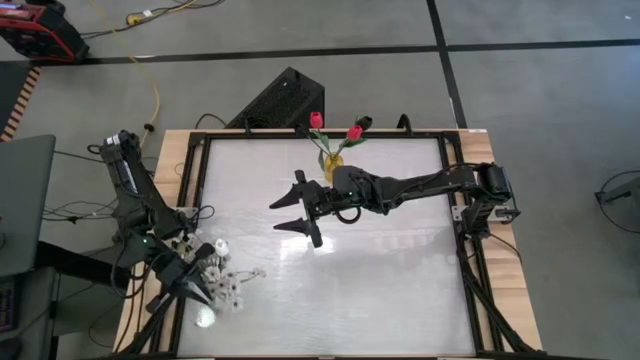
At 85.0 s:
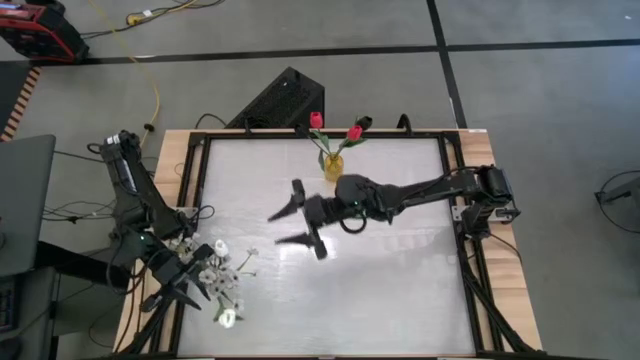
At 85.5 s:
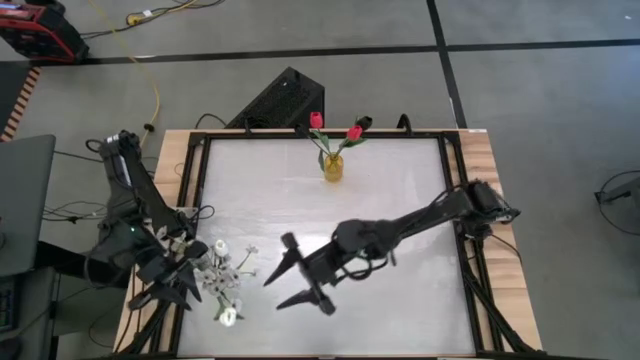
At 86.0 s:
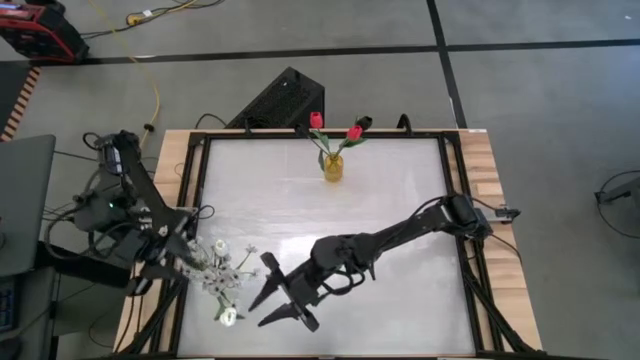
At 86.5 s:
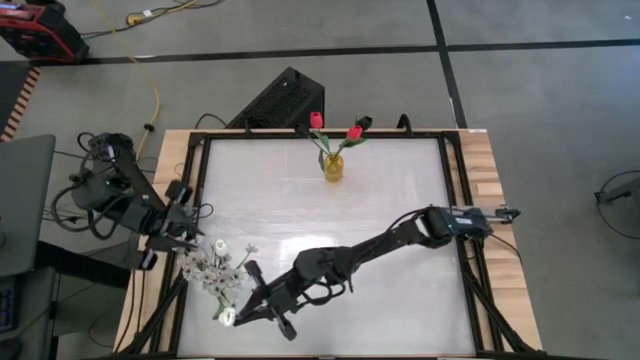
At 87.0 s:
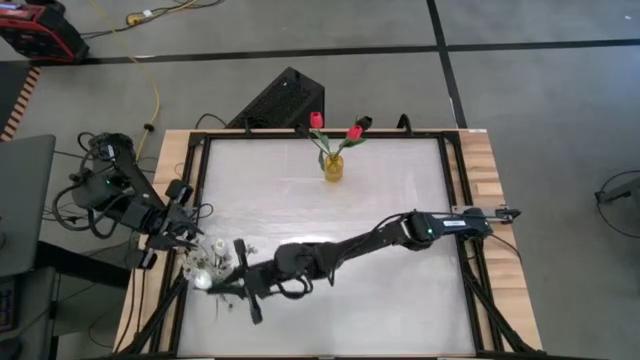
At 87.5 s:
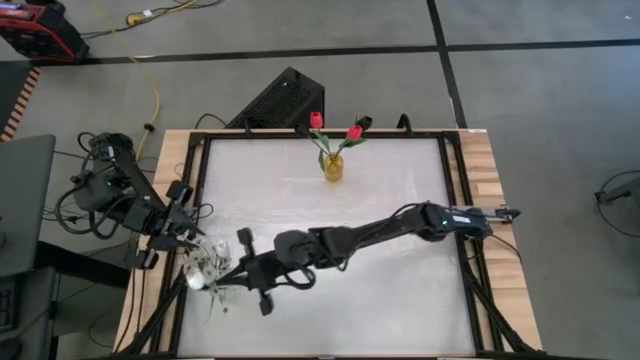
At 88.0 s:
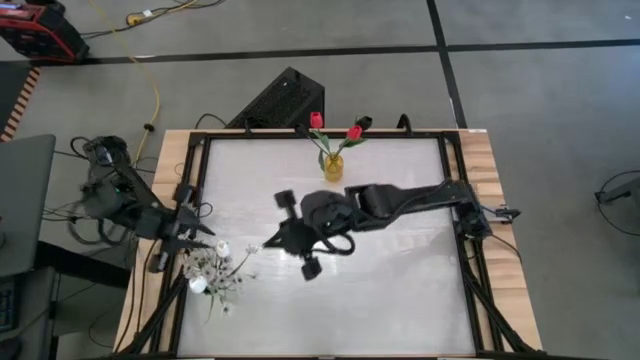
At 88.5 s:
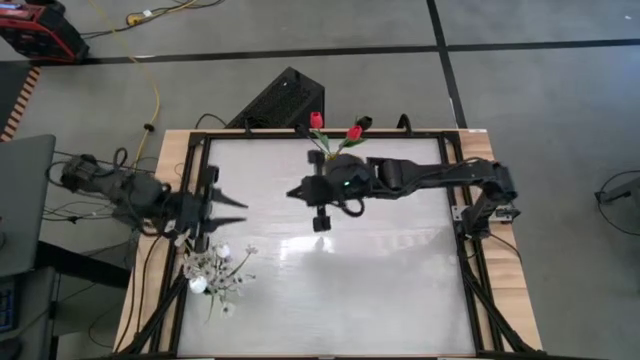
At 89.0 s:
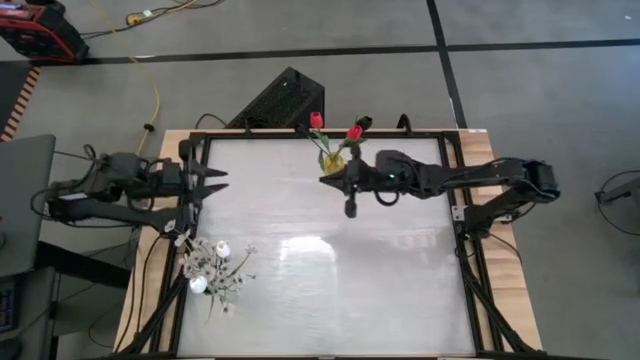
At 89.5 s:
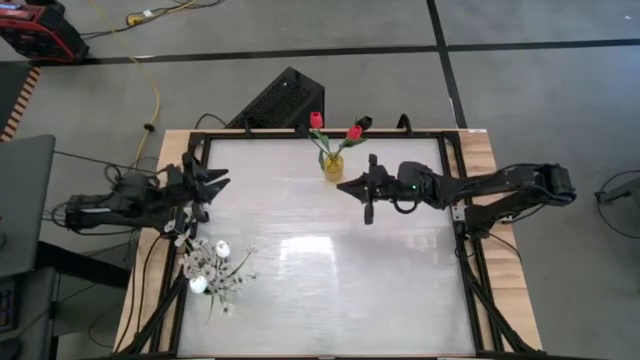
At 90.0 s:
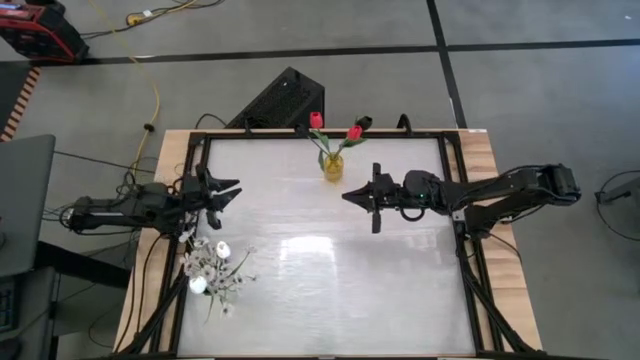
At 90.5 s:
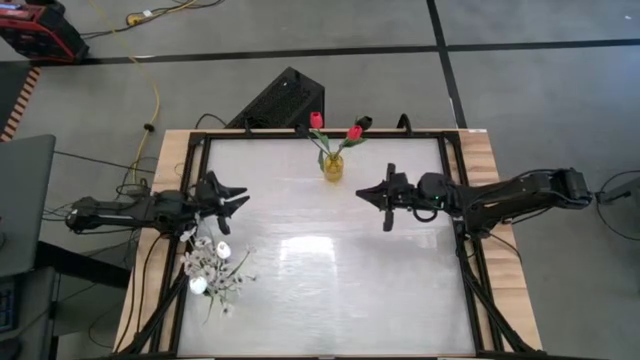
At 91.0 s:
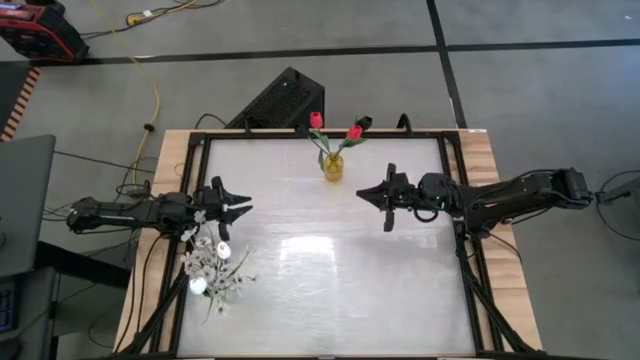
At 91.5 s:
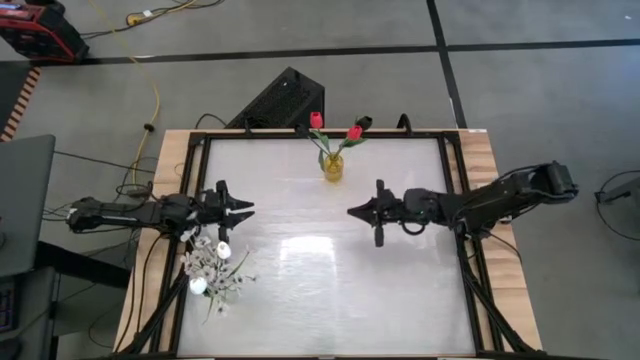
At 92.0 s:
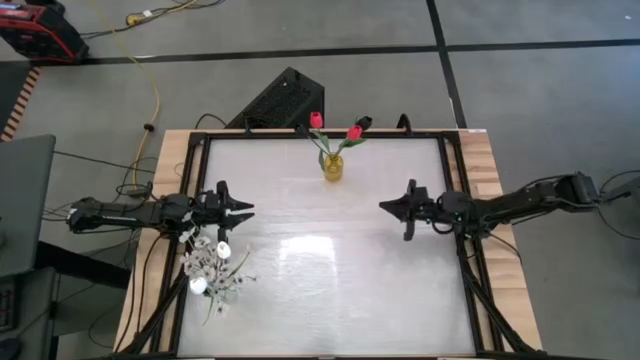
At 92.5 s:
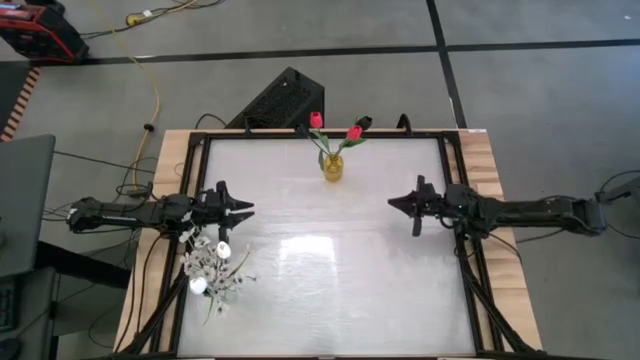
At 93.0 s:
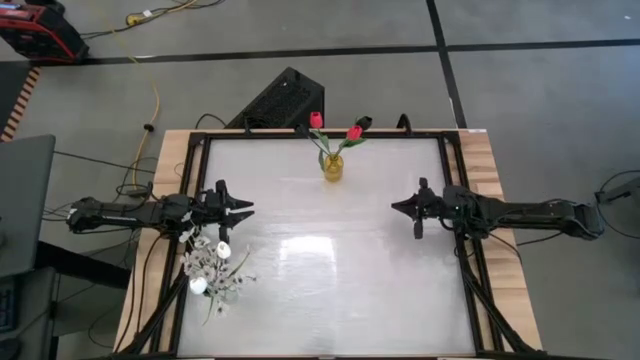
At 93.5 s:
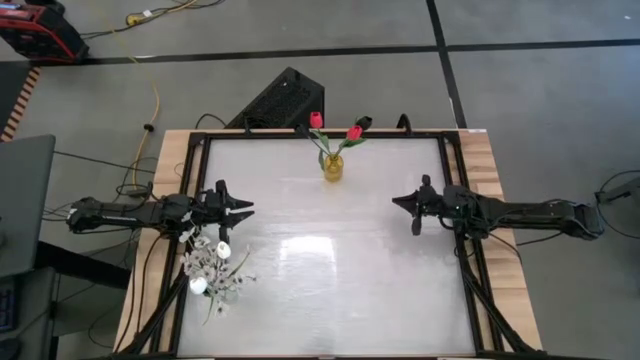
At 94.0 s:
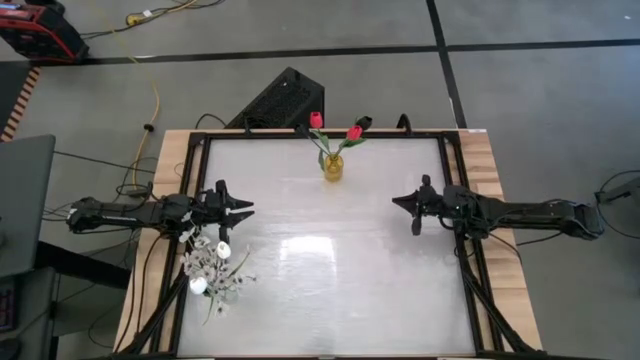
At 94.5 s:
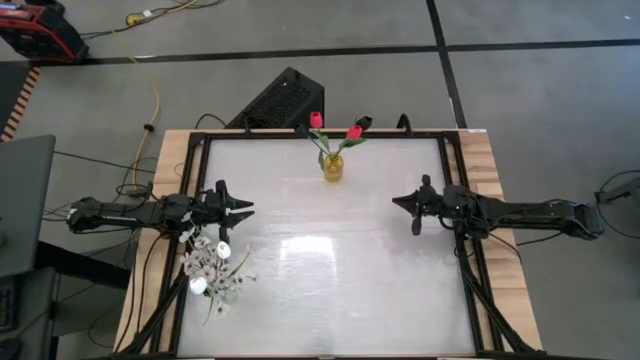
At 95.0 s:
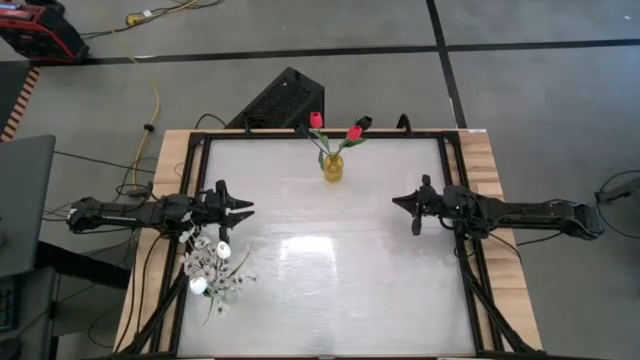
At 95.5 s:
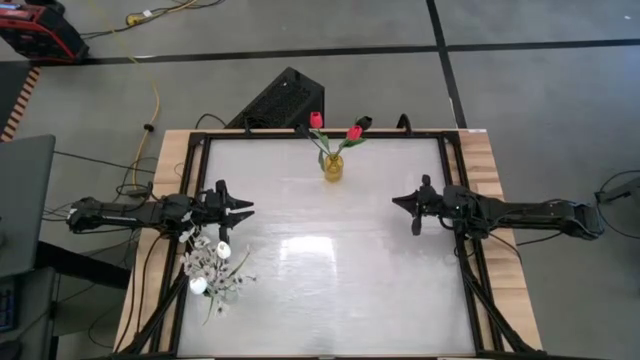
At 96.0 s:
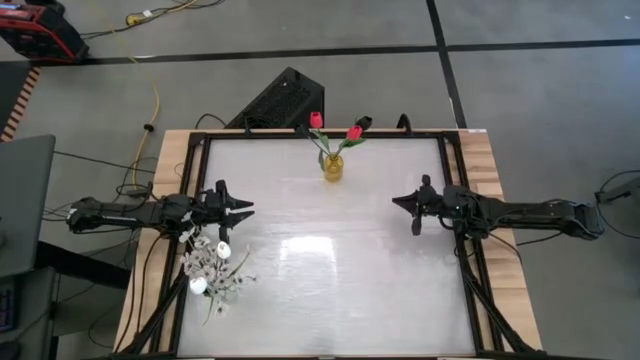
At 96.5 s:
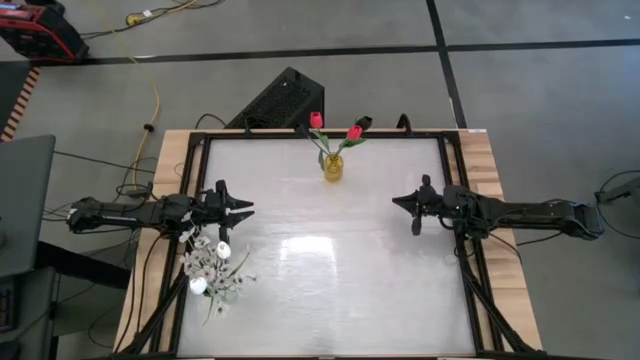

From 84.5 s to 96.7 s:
Task: Sort flowers into vase by color
Return to Home Position

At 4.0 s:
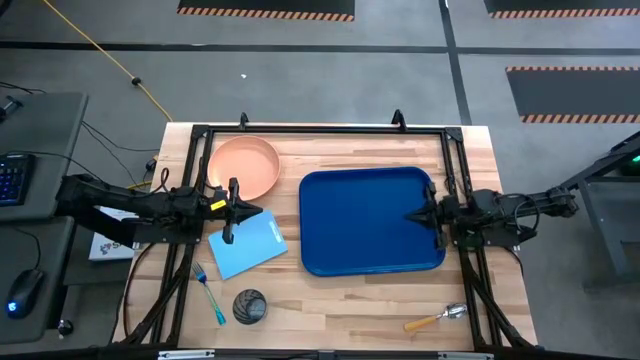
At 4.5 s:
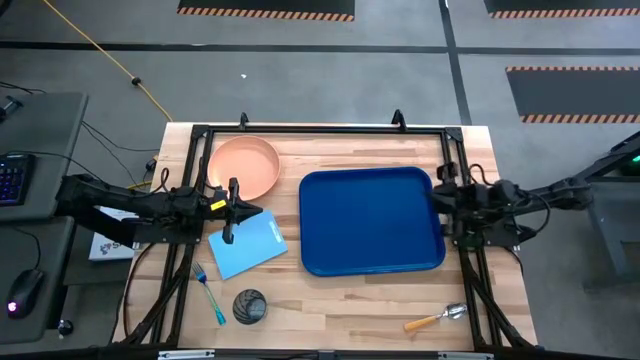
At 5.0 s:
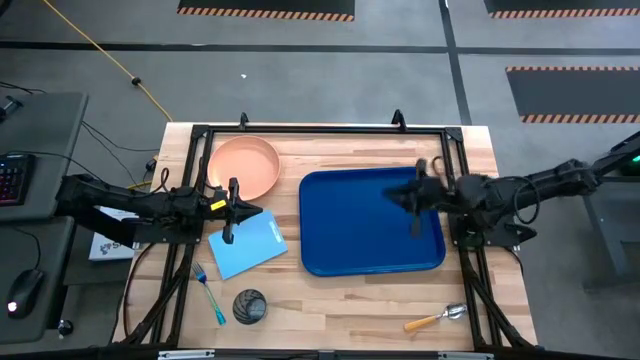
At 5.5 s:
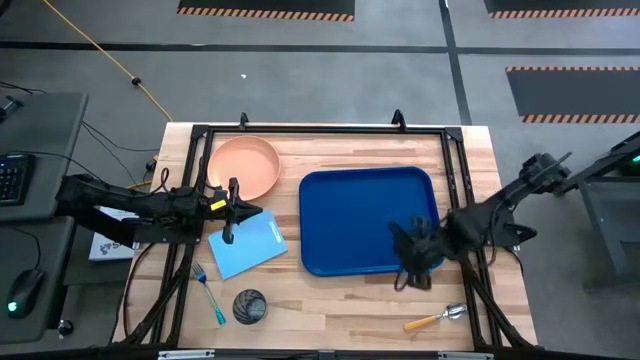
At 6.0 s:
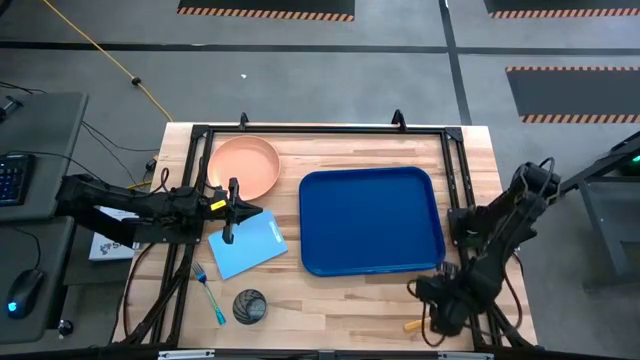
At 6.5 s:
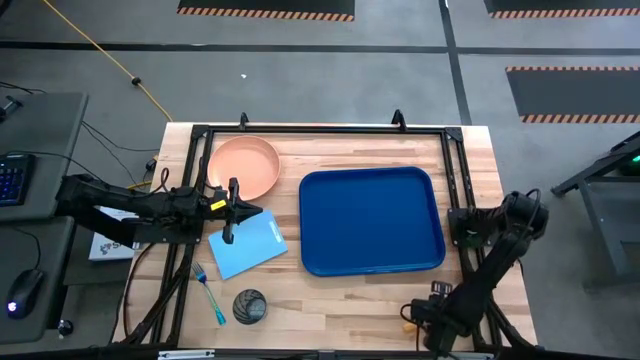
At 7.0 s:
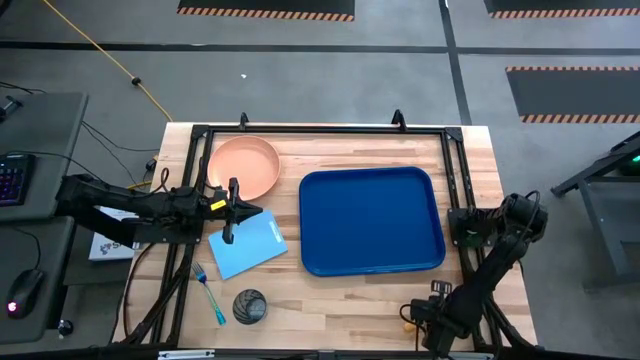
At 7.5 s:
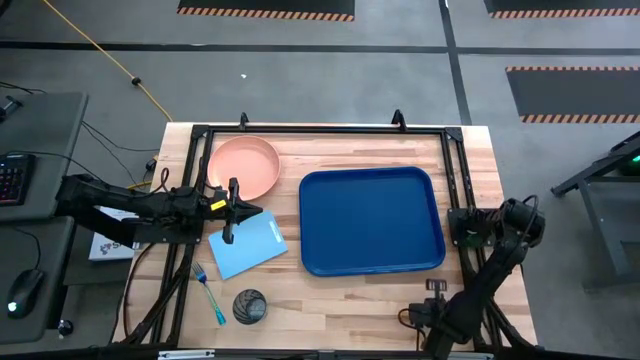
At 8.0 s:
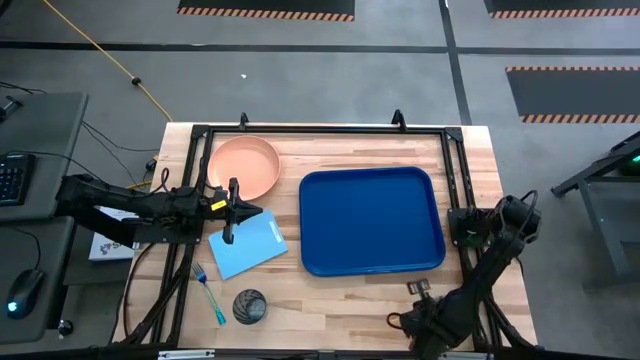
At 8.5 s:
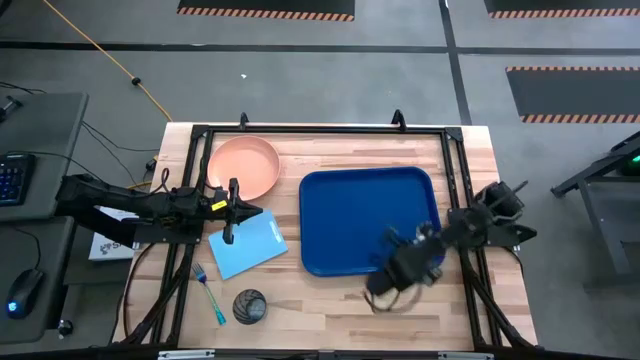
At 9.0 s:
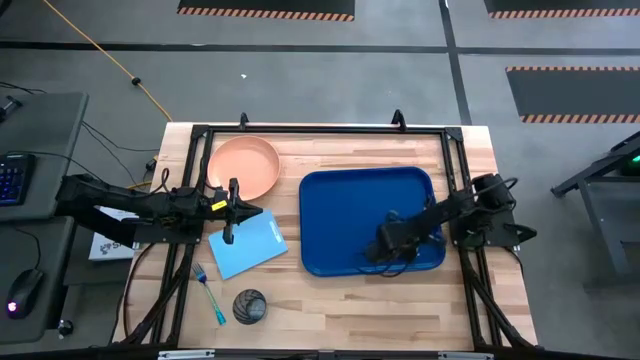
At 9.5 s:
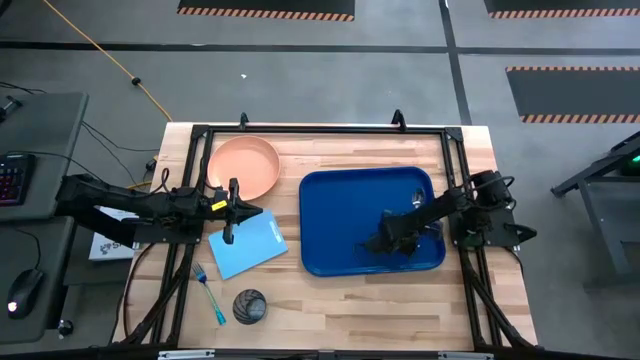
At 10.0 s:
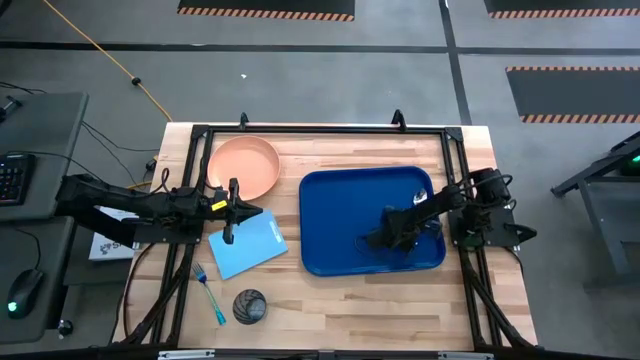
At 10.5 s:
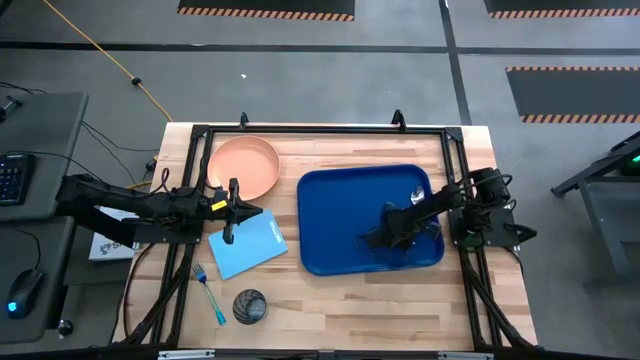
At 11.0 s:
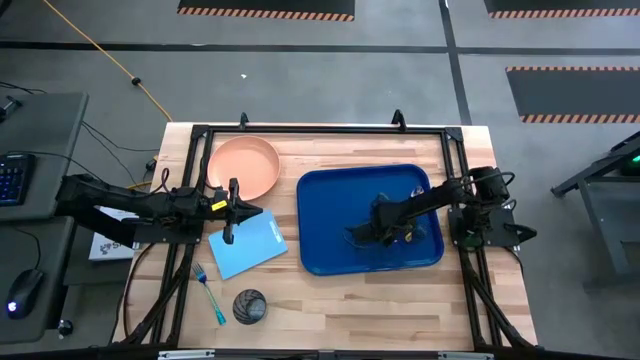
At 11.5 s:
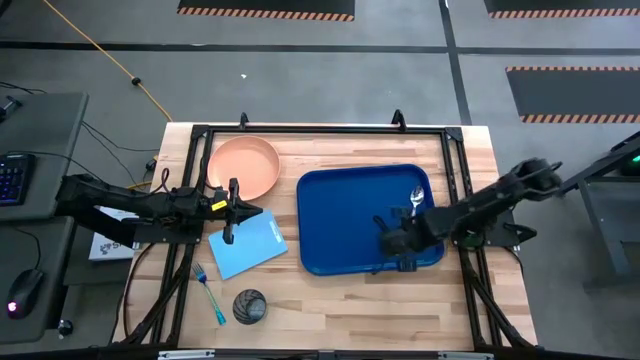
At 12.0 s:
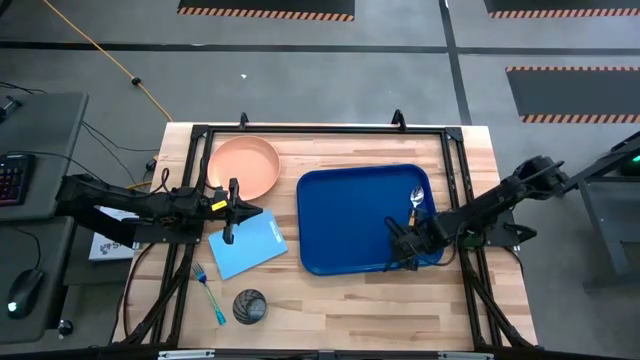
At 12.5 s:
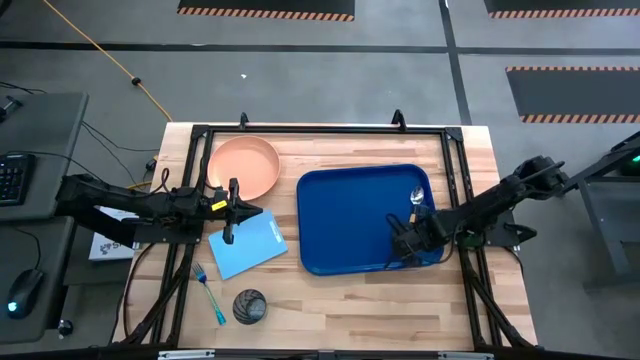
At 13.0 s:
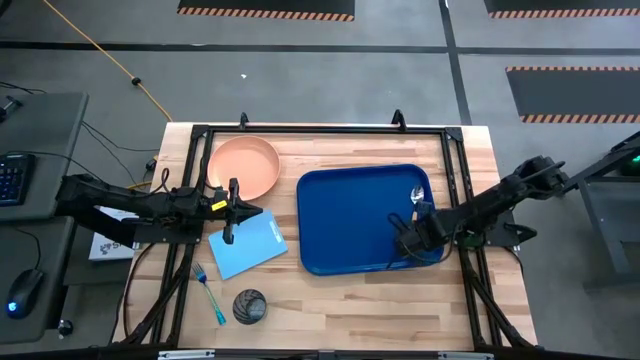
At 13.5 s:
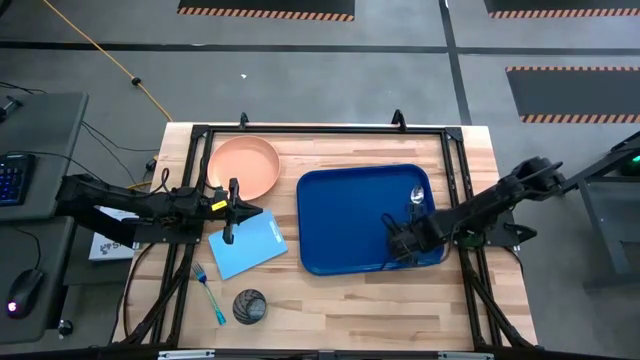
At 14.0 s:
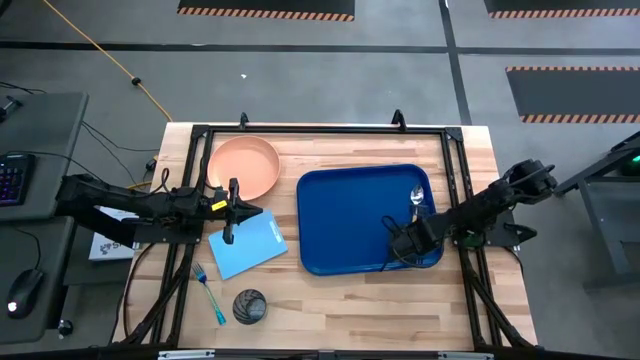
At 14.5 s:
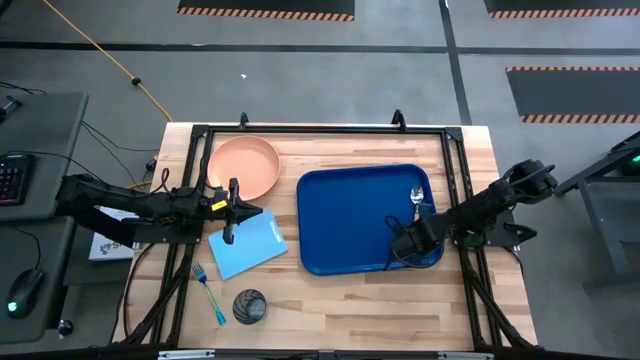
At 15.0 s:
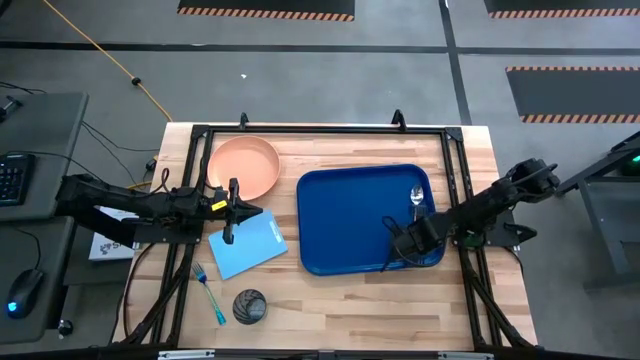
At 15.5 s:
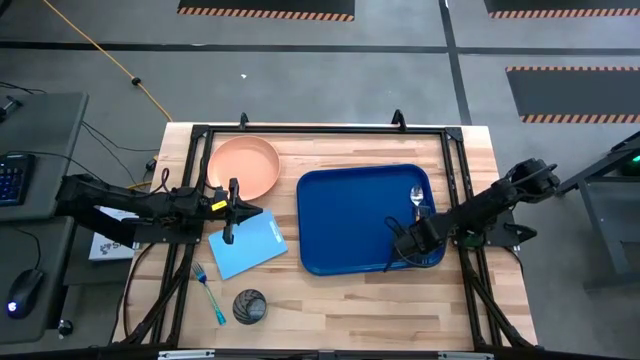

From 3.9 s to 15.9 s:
Task: Pick and place plate/cup/fork/spoon on tray
Put the orange spoon on the blue serving tray
